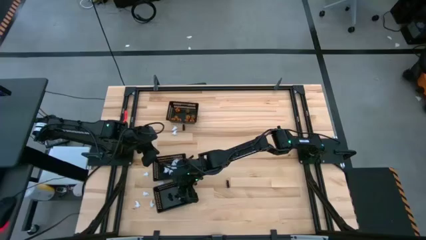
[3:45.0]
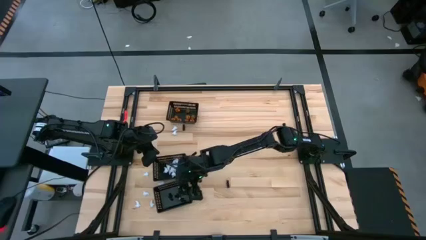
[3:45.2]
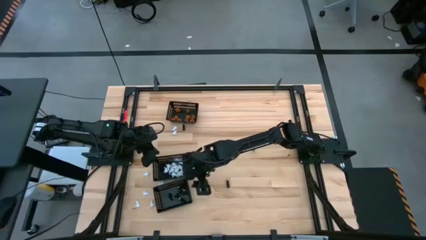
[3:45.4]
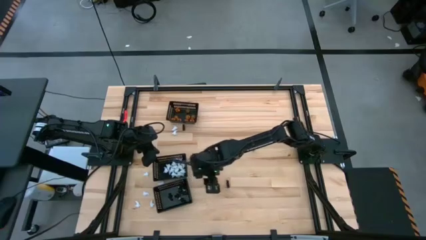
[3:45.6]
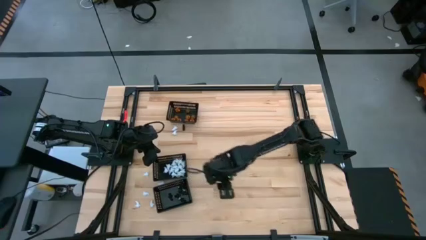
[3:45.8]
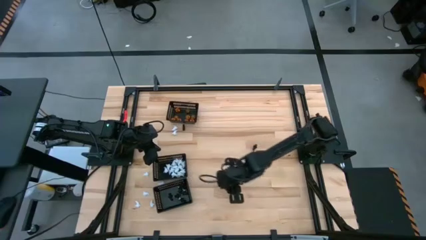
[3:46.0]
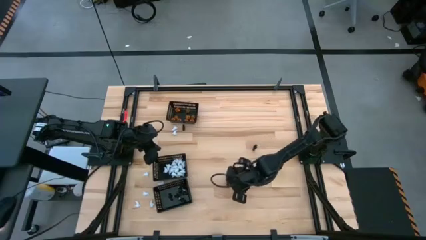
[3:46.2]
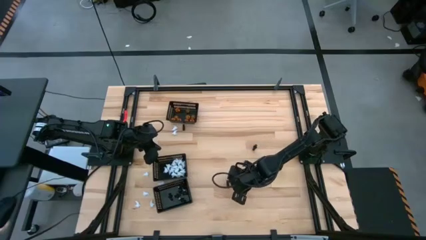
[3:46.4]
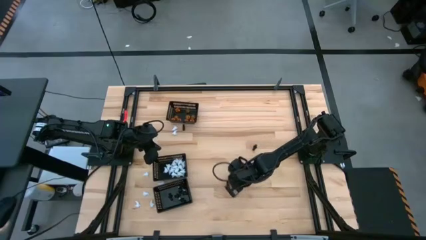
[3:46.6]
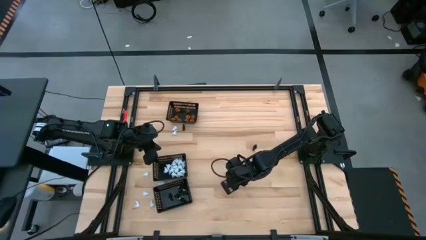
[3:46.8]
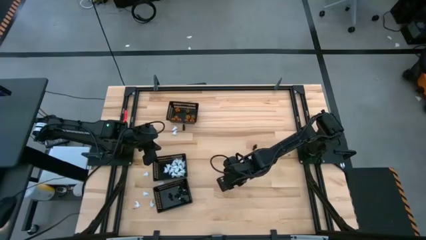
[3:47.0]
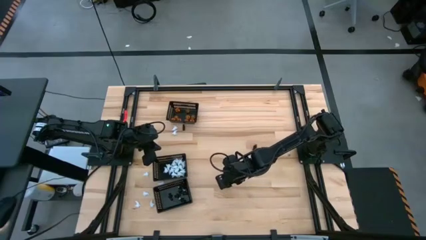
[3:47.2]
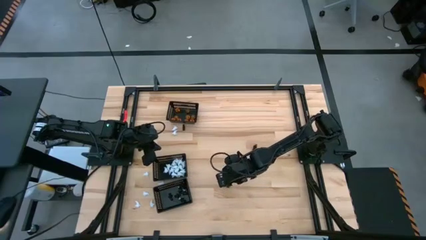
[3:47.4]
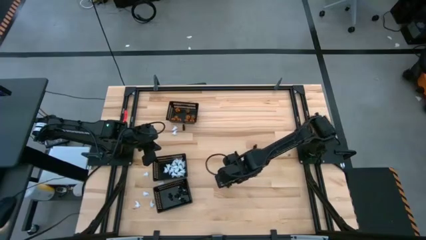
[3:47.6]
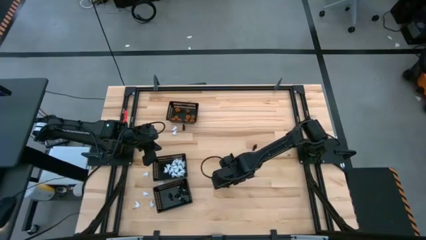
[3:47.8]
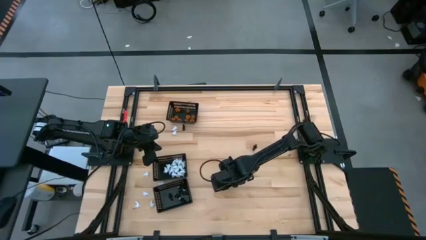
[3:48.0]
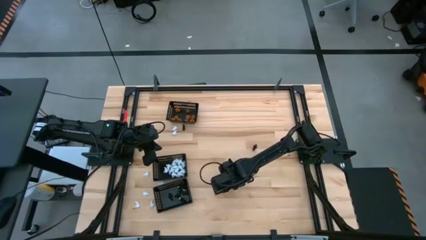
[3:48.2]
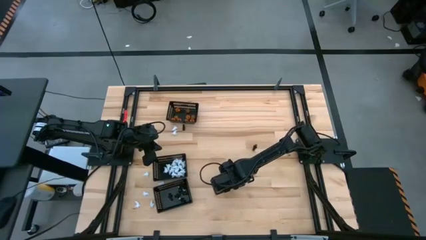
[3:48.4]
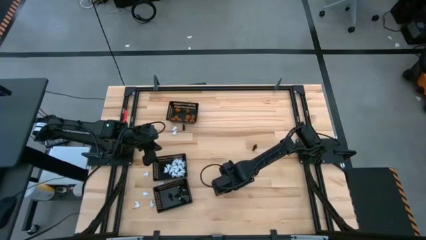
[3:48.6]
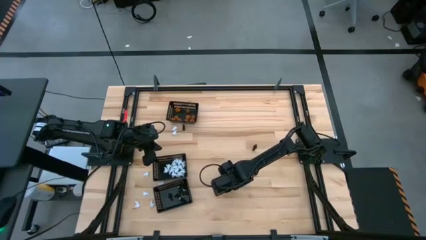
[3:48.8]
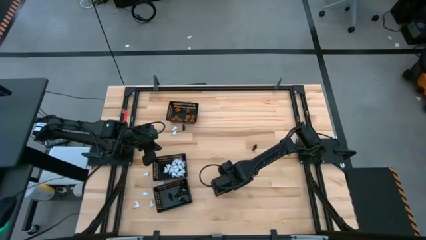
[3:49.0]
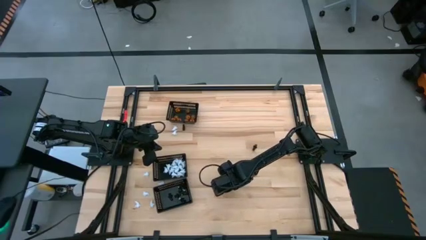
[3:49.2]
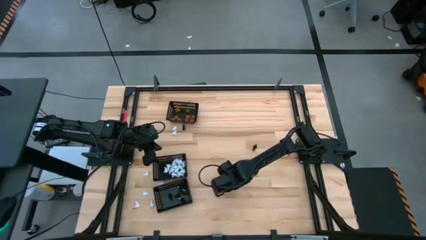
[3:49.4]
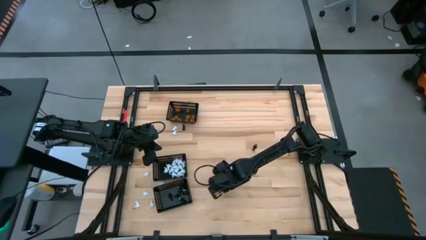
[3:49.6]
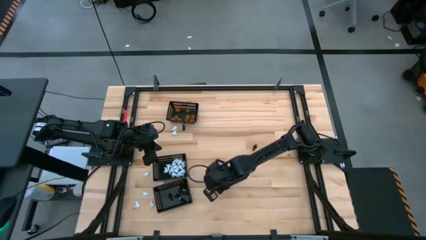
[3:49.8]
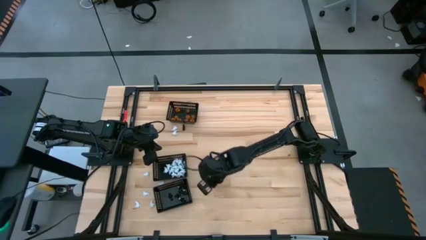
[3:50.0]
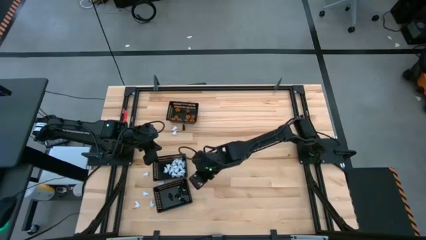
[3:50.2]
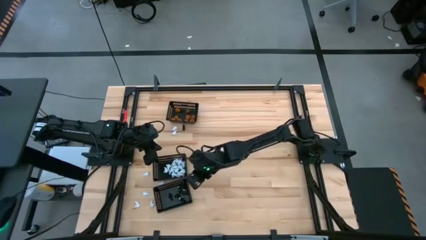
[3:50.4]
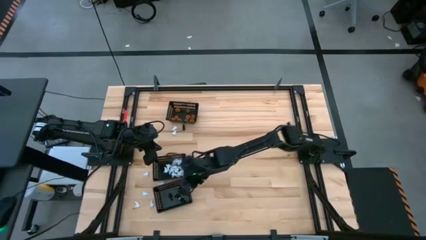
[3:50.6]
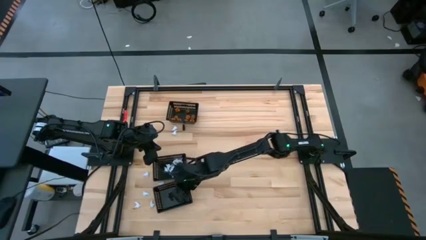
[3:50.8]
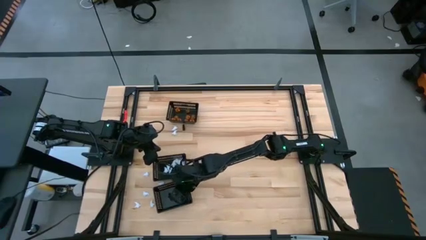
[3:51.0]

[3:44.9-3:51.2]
Task: Sort Halloween decoration
Put the black skeleton toy into the bottom black bin

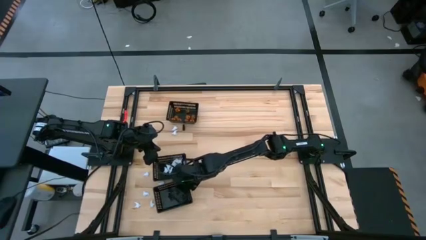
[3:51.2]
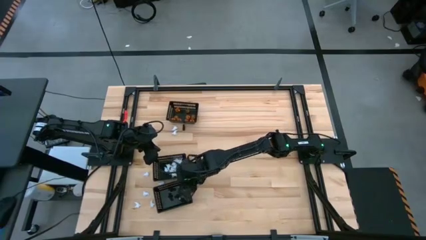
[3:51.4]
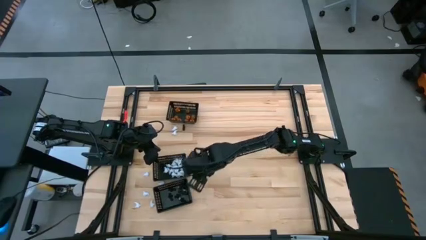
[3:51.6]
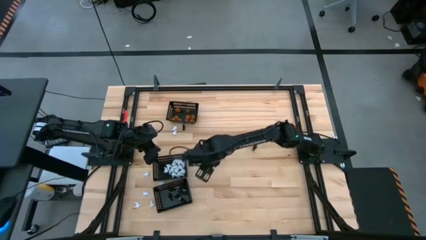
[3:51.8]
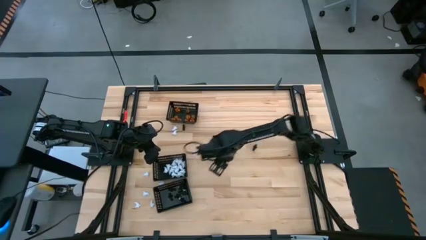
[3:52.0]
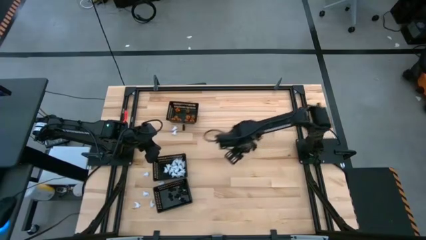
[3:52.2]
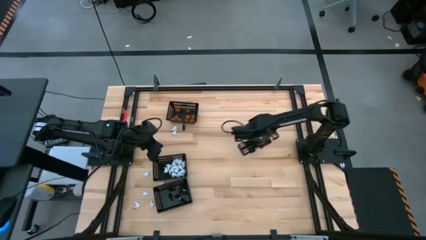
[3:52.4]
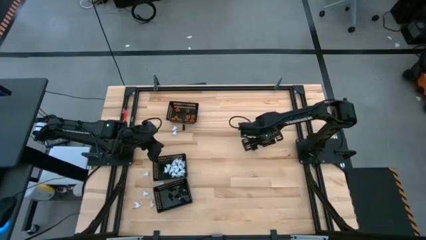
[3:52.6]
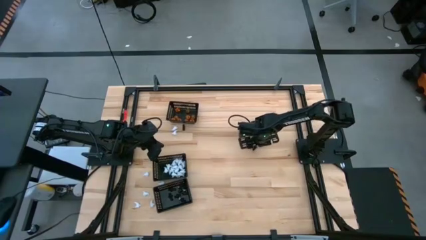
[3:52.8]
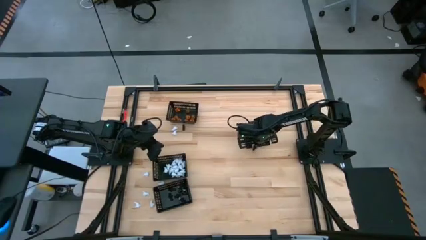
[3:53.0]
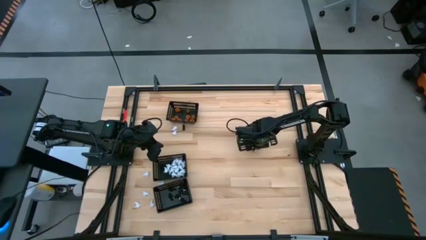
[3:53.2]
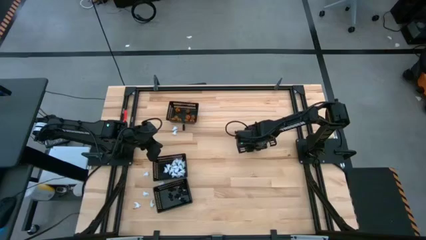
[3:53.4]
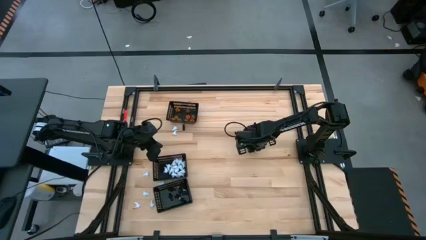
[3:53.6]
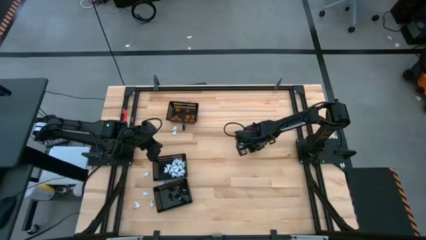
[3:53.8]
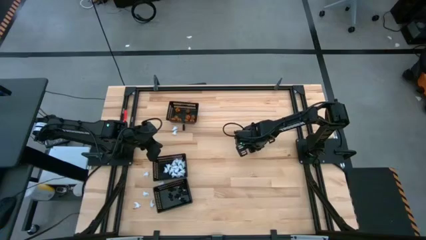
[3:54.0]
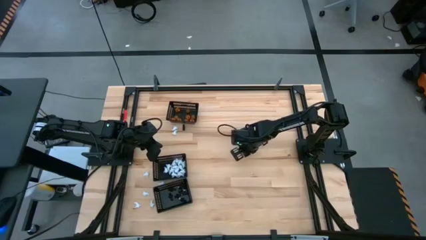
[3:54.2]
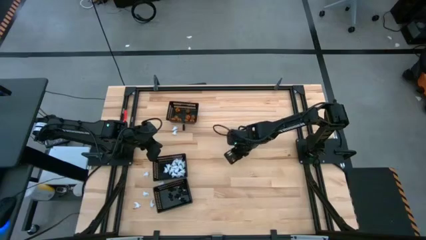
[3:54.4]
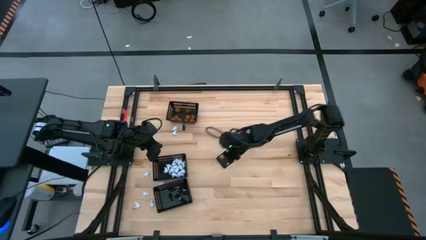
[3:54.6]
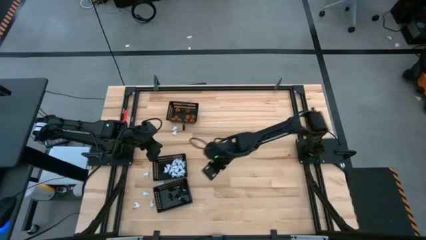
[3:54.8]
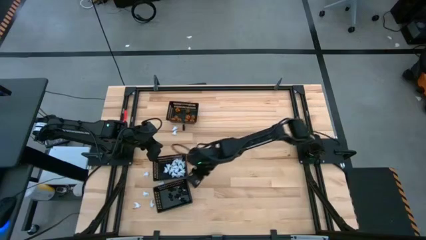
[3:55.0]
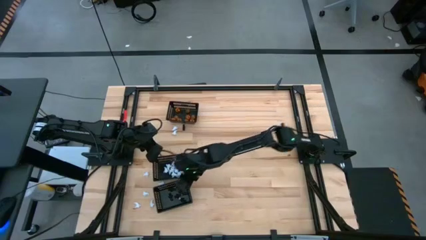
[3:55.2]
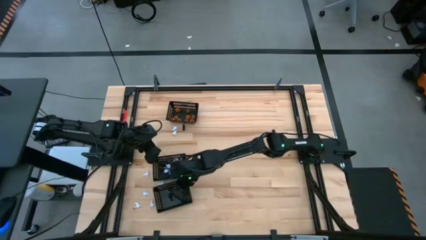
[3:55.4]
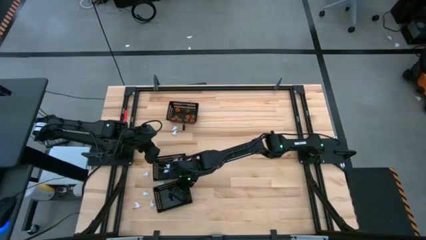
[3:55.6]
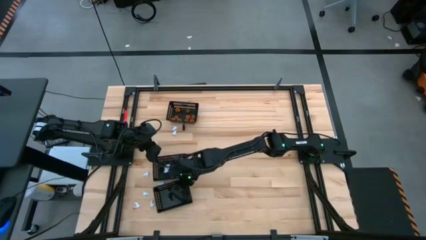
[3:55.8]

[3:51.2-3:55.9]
Put the black skeleton toy into the bottom black bin

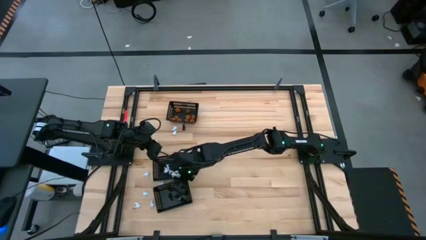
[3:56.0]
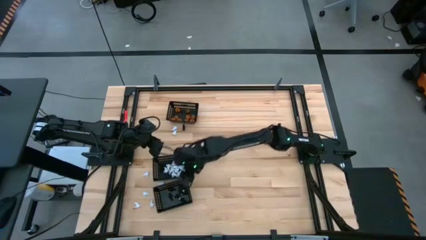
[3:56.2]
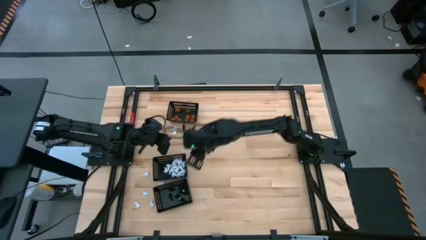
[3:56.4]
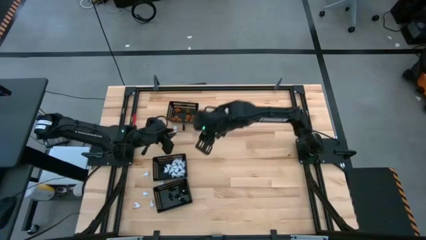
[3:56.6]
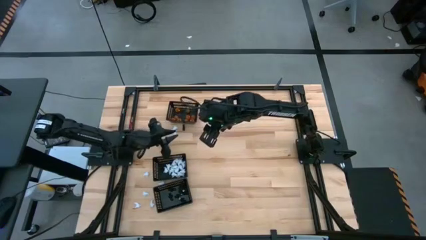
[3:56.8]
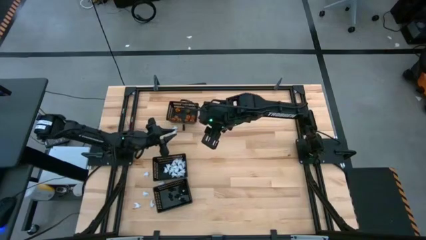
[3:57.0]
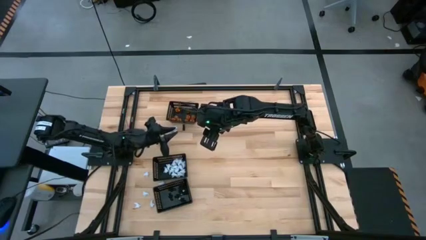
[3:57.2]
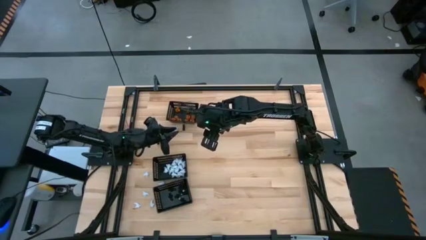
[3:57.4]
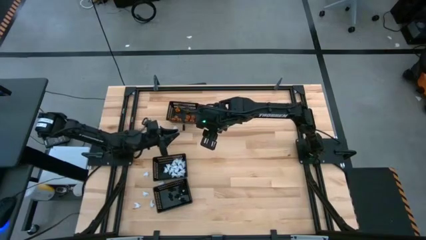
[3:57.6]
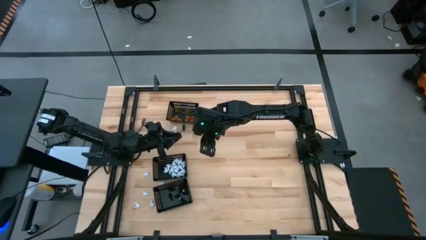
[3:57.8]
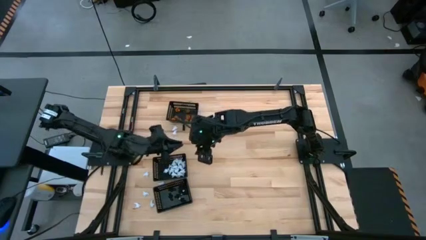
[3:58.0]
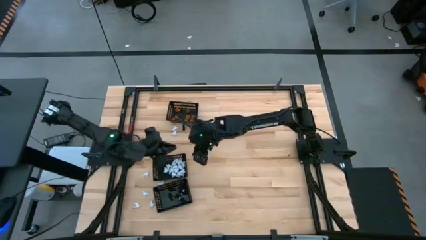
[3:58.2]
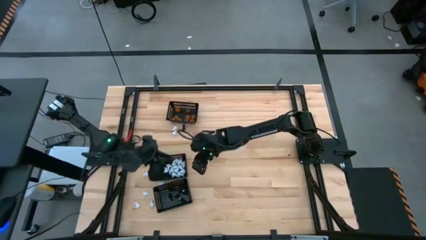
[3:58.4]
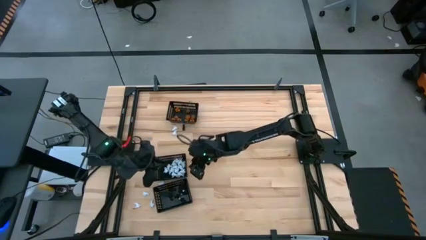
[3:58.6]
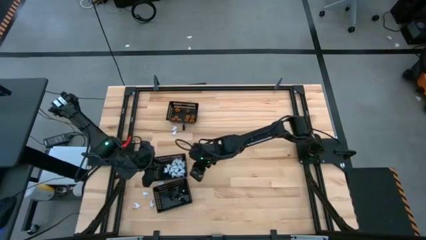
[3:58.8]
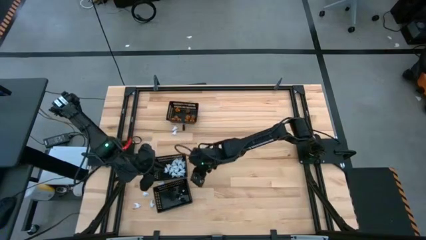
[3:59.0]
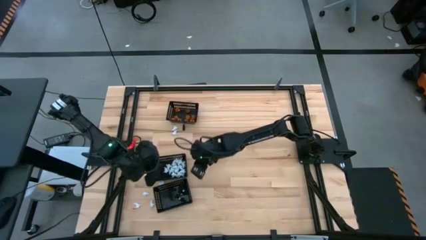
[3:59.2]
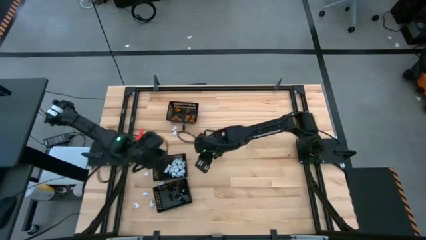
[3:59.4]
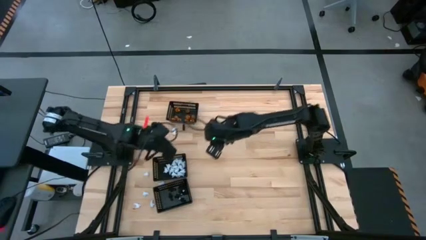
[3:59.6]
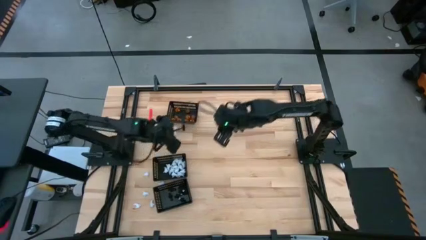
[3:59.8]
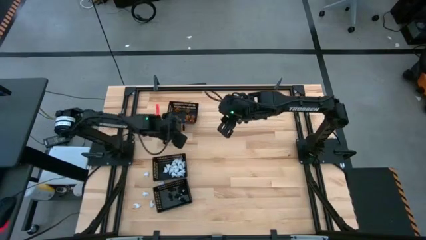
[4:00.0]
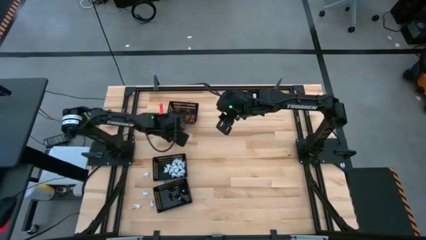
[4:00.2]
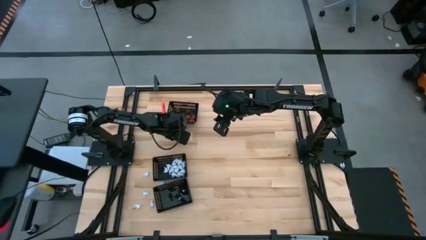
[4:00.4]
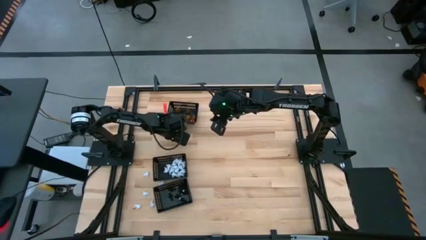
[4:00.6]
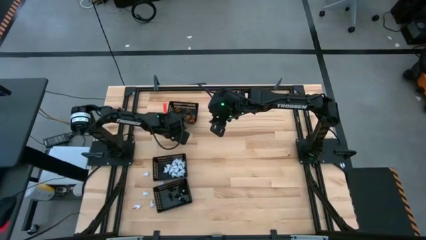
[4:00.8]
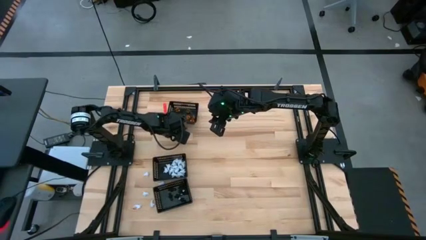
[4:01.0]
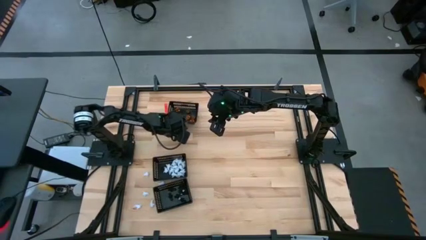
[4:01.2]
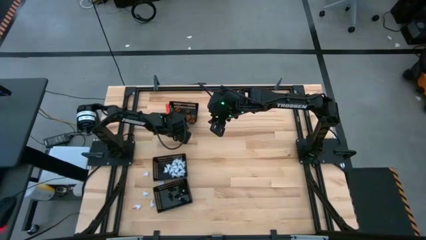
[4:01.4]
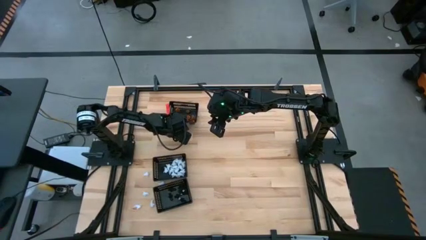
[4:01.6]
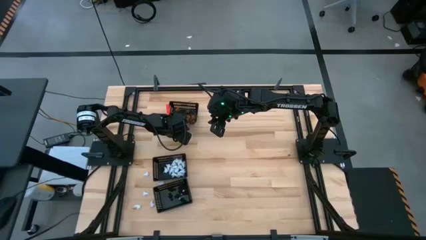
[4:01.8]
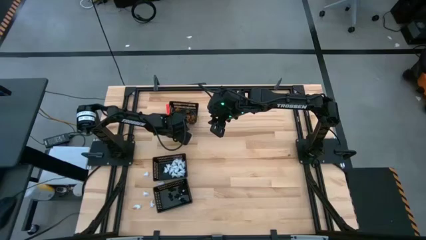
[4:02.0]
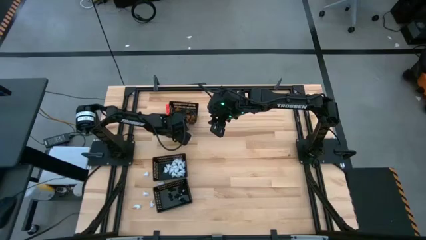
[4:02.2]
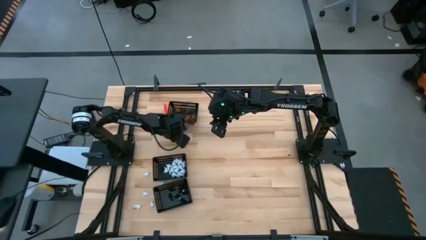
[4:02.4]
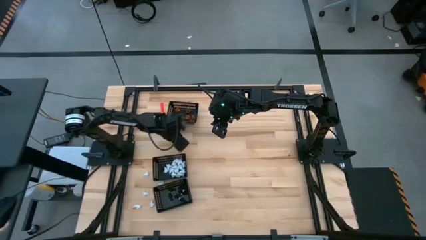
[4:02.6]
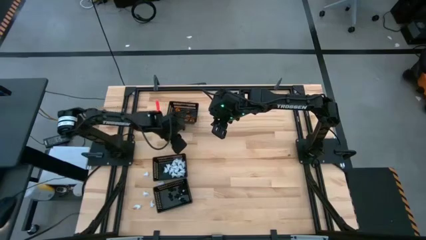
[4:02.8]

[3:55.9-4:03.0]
Put the white toy into the middle black bin
